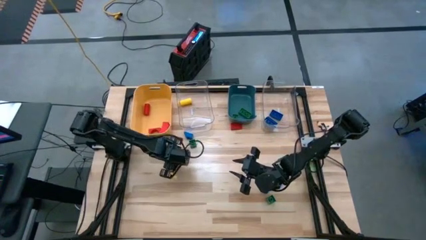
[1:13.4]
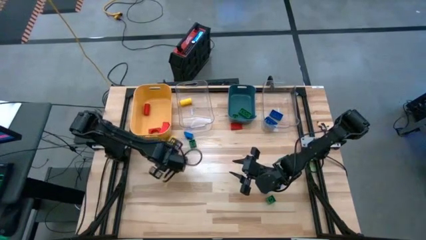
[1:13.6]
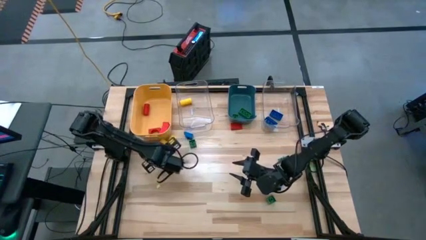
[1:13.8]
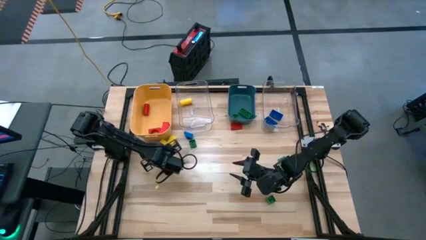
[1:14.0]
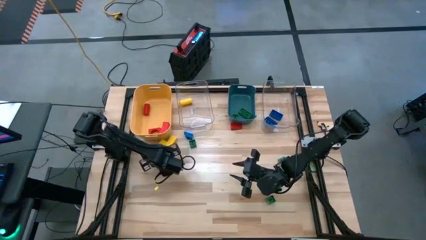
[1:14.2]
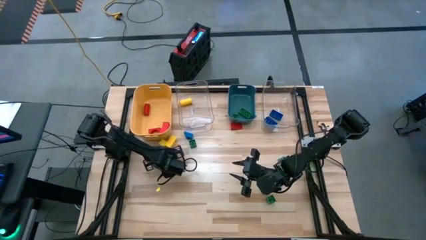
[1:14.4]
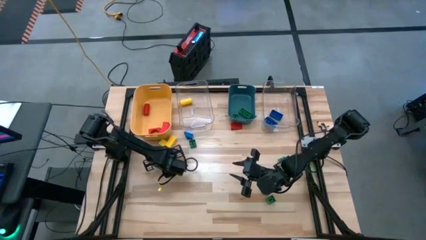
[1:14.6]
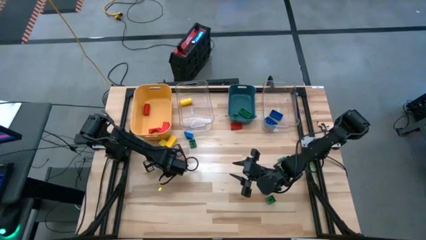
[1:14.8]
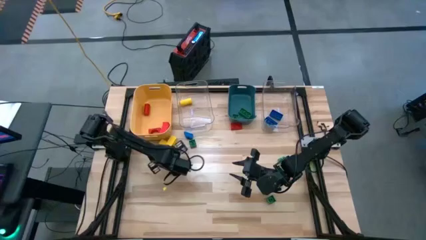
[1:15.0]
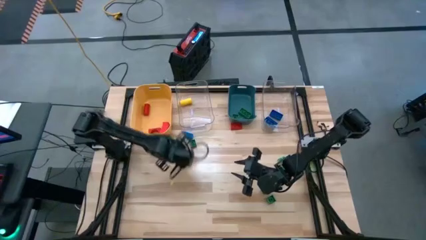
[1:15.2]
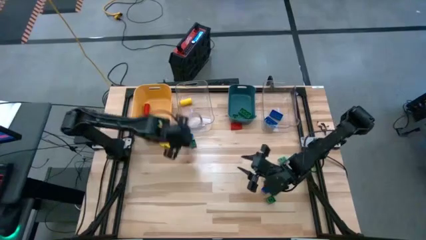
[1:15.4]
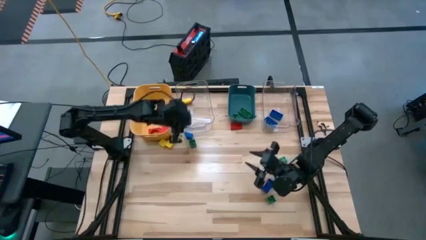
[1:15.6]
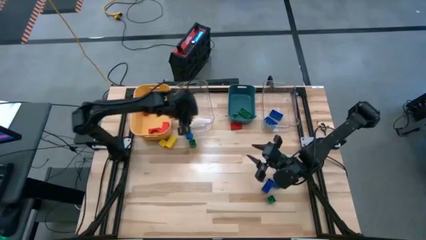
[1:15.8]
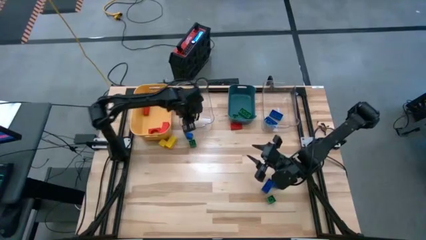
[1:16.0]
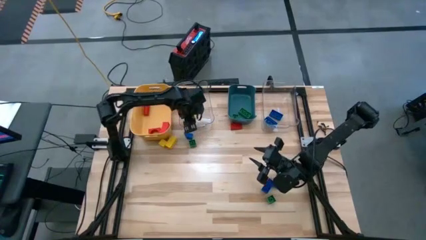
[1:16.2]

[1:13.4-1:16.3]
Task: Sort blocks
Put the yellow block into the left transparent bin

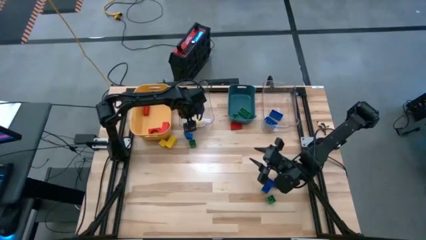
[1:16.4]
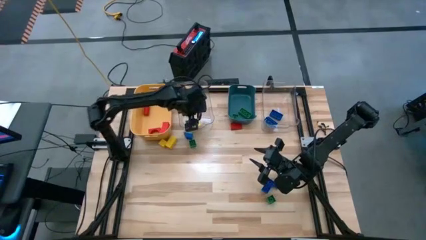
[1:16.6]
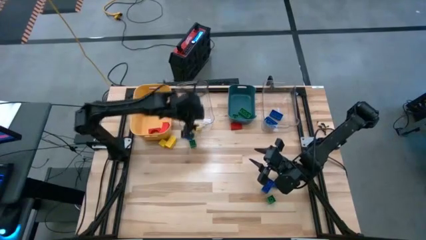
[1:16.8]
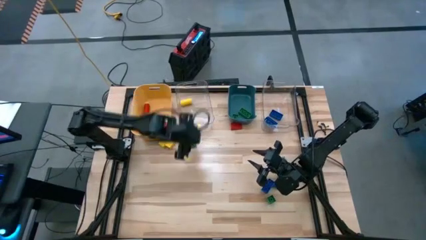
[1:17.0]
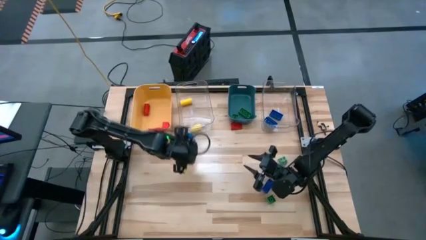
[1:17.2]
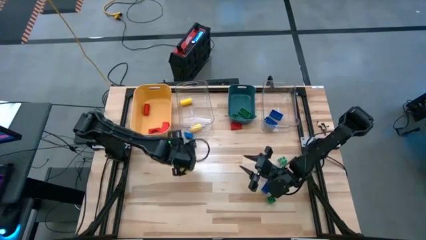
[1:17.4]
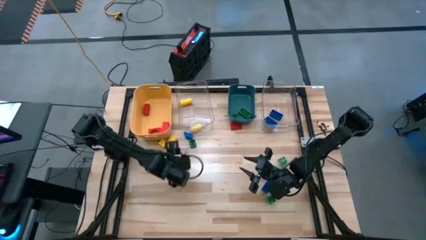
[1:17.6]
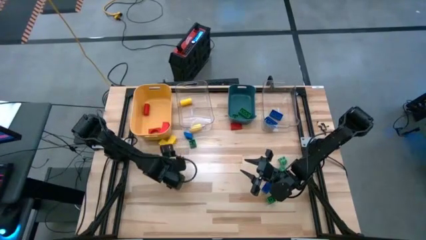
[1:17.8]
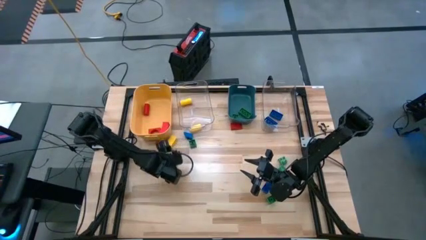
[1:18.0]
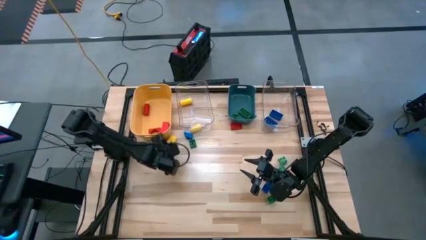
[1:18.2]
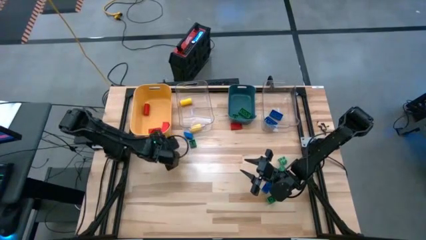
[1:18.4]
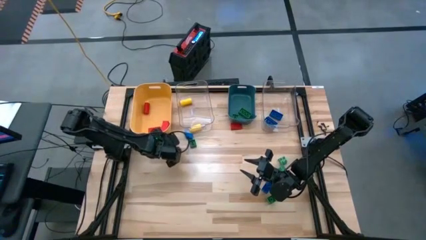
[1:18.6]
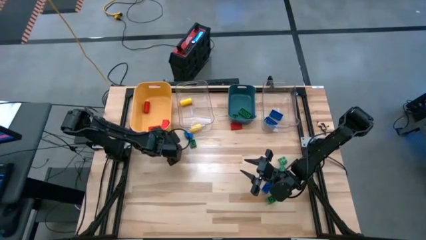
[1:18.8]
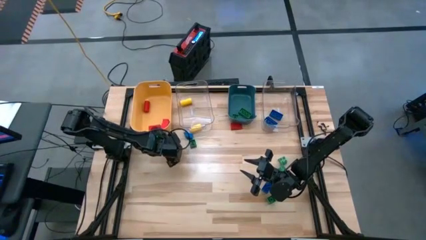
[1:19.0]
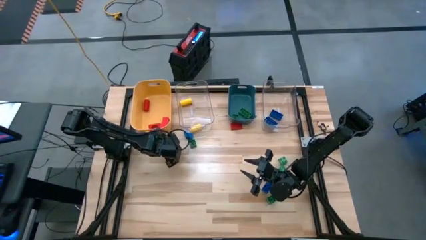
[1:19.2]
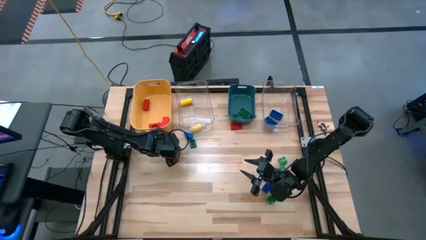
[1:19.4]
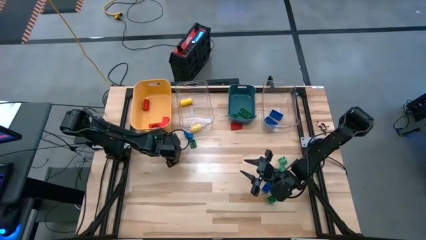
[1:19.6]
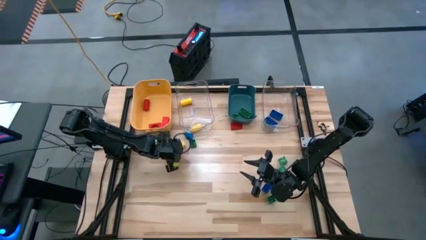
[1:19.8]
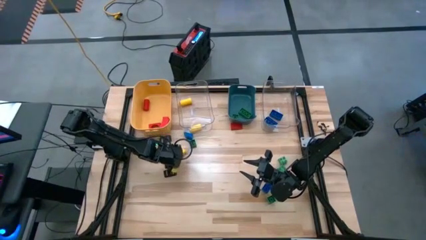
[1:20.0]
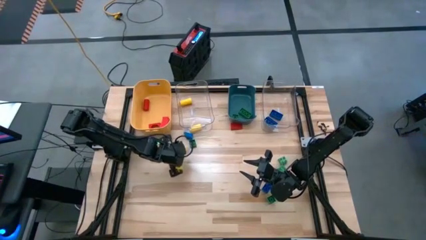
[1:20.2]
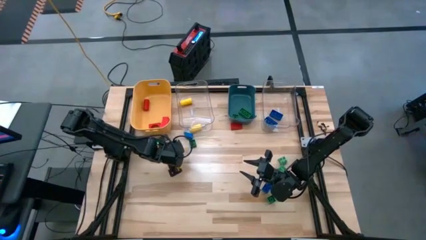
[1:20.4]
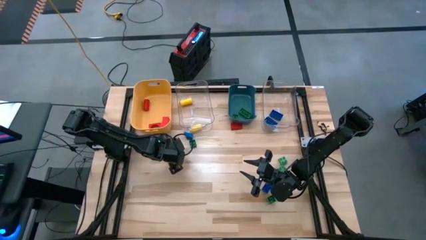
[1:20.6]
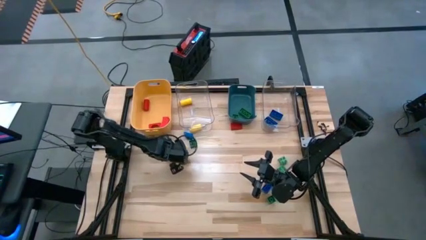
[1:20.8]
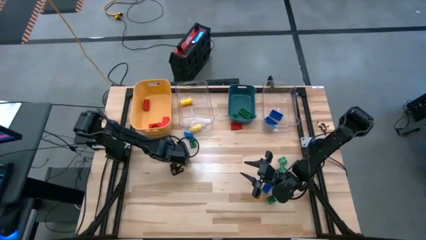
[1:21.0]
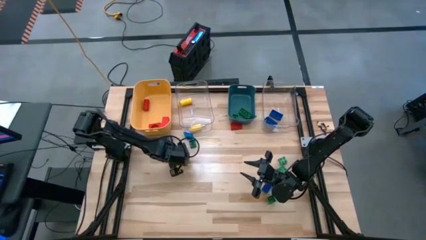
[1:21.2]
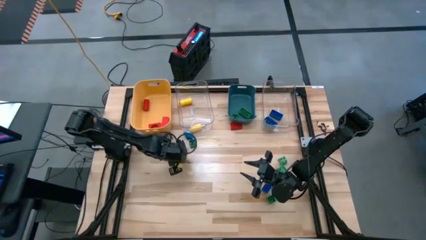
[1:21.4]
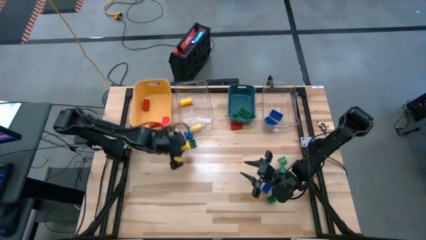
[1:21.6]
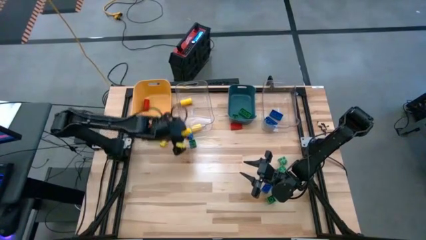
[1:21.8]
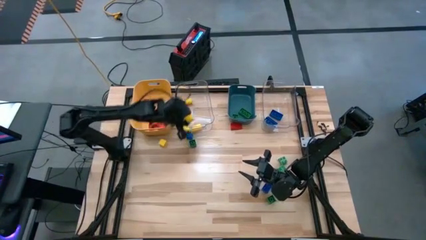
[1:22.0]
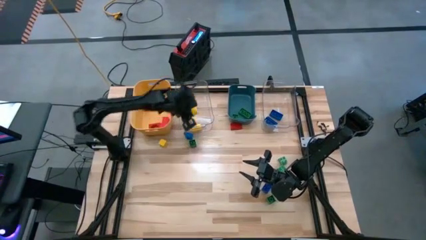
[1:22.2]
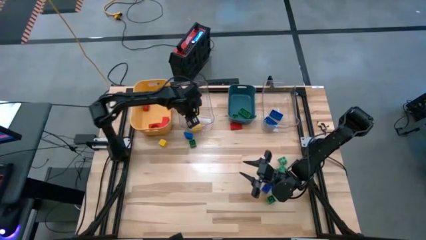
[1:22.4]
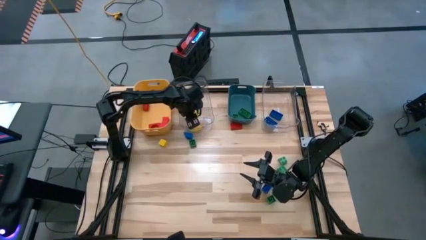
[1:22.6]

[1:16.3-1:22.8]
Put the yellow block into the left transparent bin

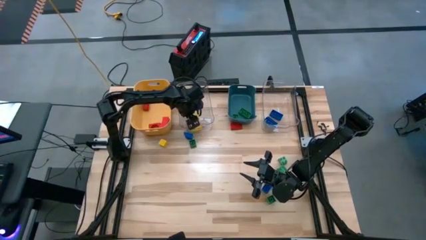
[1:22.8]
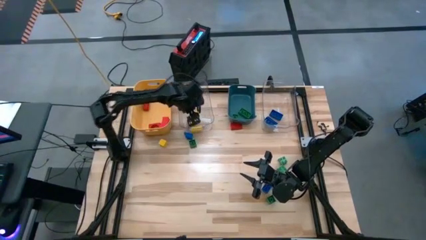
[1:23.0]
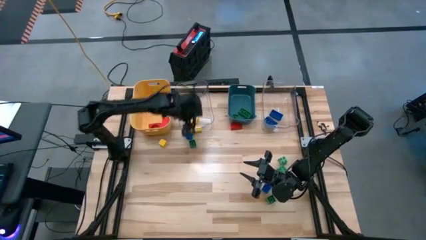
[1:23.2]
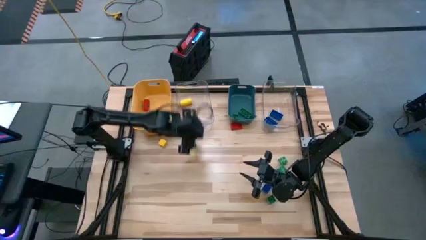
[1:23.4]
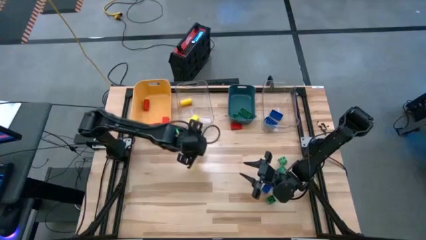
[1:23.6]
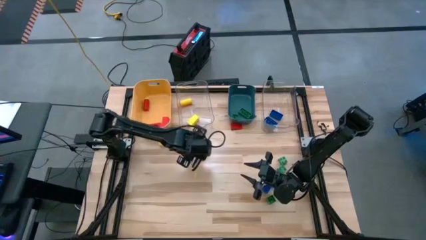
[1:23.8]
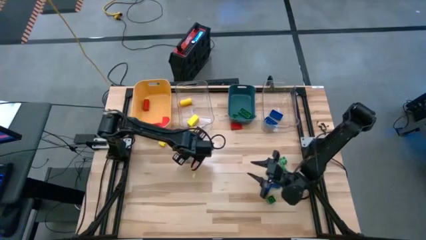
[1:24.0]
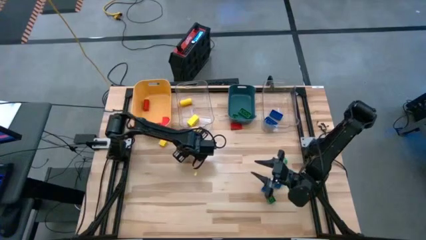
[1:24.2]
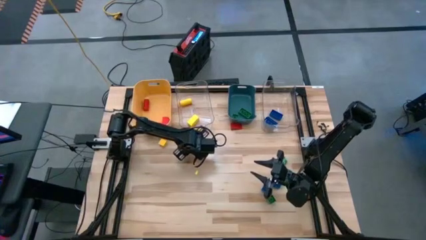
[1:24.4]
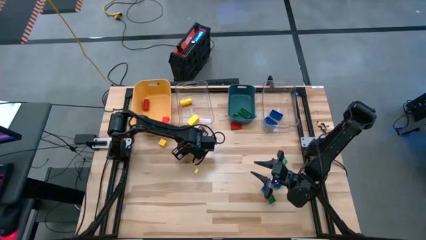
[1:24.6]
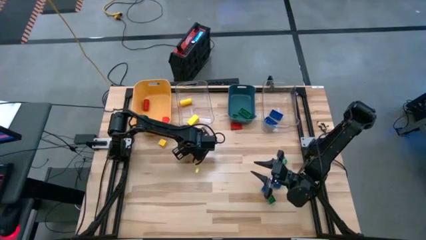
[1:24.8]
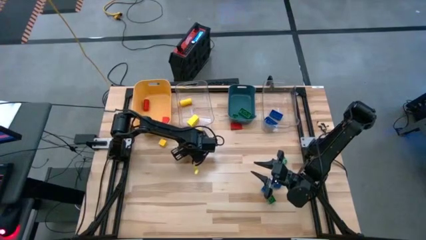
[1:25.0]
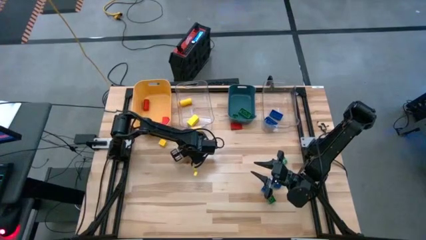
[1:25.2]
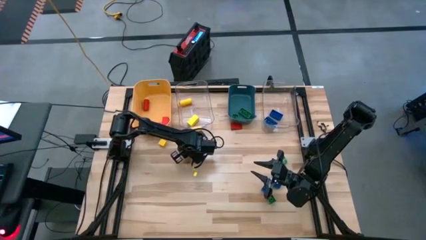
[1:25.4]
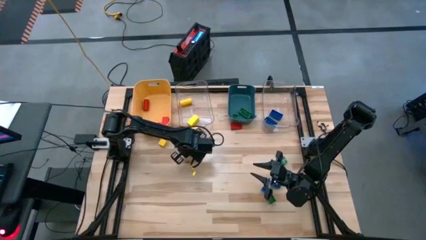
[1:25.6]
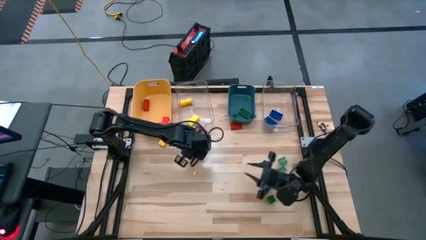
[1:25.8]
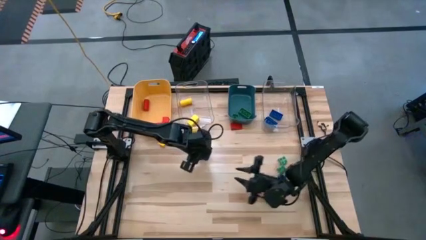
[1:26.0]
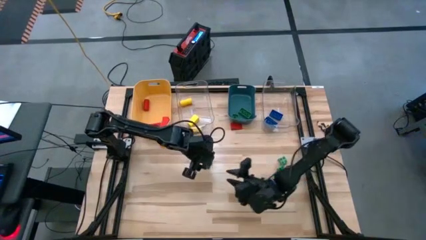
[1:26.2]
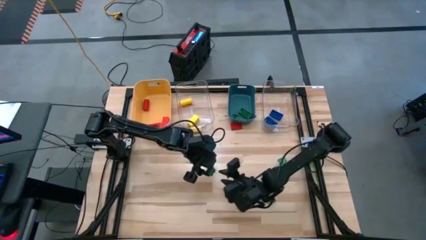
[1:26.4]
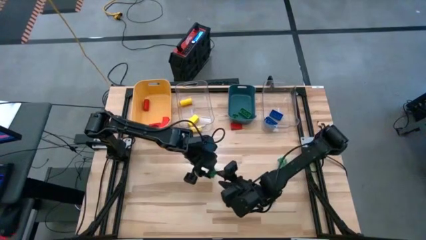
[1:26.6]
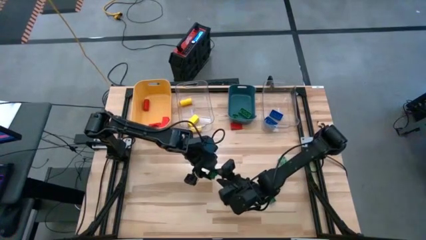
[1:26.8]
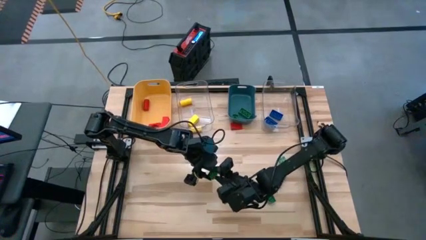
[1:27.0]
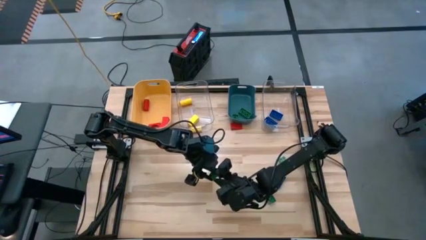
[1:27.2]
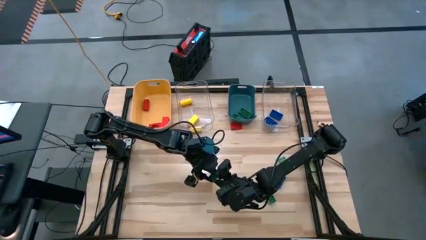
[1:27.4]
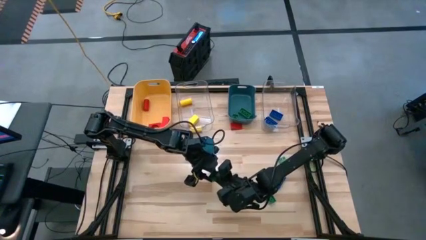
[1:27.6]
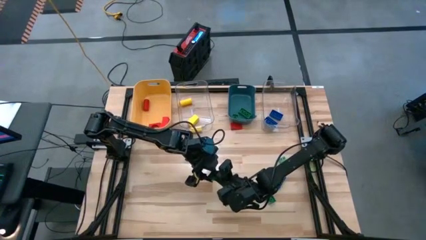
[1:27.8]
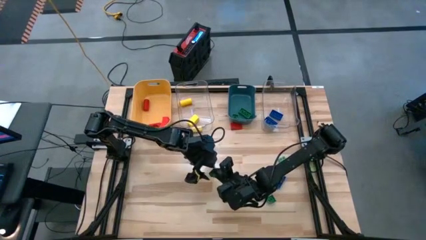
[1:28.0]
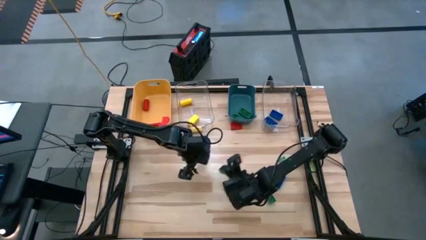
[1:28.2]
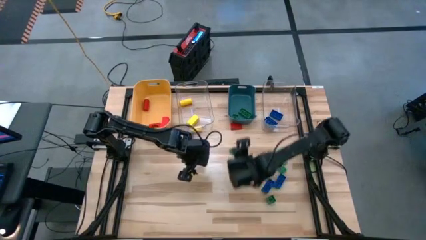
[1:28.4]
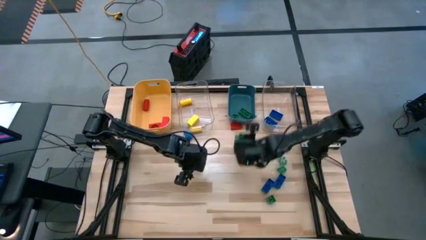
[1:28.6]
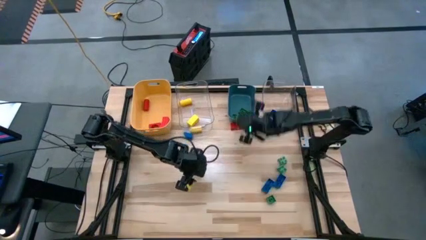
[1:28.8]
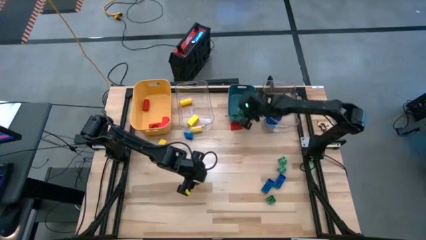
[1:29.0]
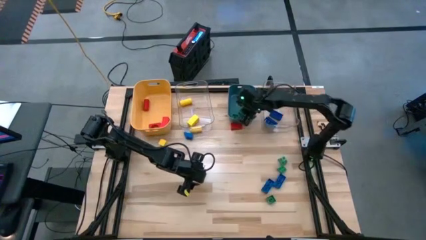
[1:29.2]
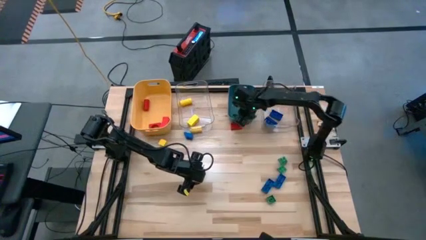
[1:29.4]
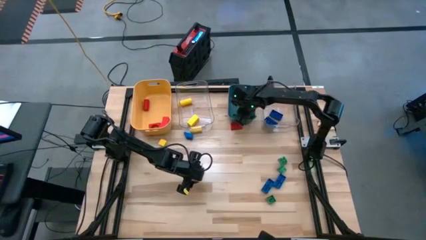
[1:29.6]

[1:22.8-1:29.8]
Put the green game piece into the blue bin
